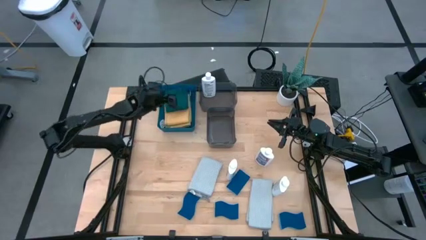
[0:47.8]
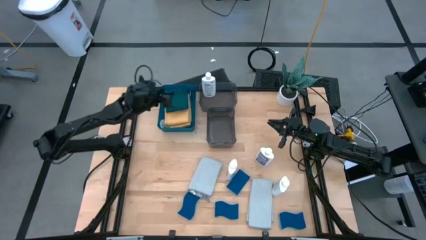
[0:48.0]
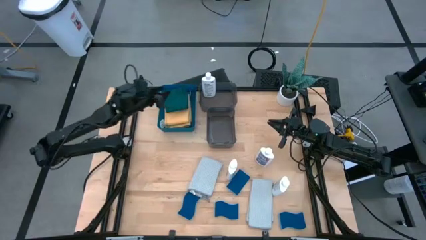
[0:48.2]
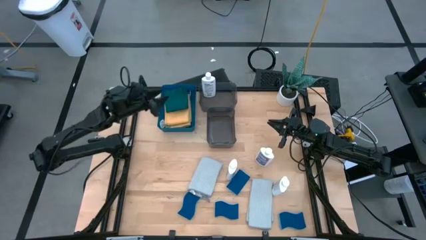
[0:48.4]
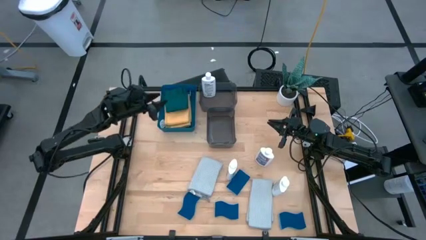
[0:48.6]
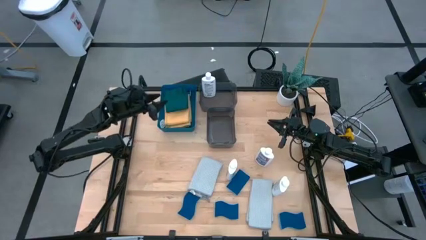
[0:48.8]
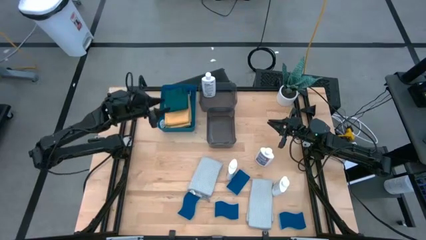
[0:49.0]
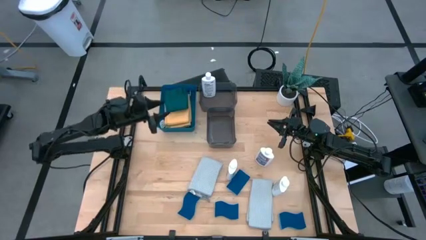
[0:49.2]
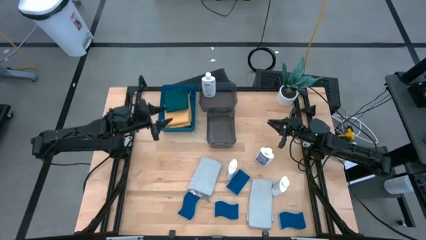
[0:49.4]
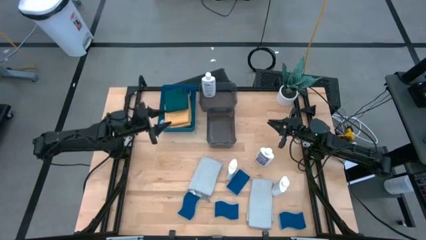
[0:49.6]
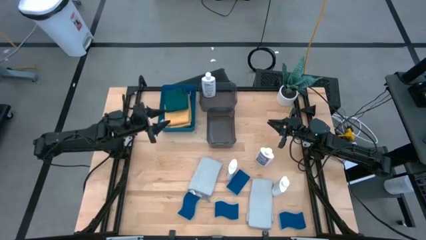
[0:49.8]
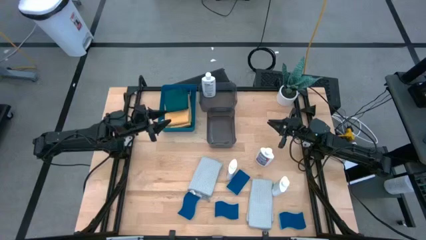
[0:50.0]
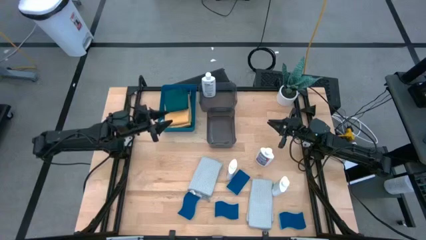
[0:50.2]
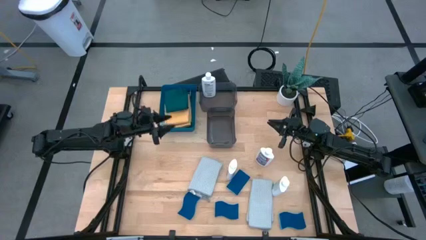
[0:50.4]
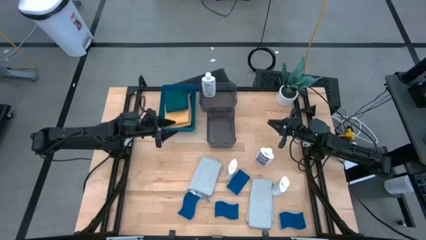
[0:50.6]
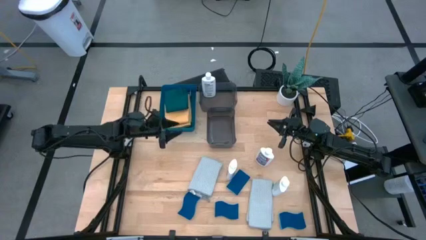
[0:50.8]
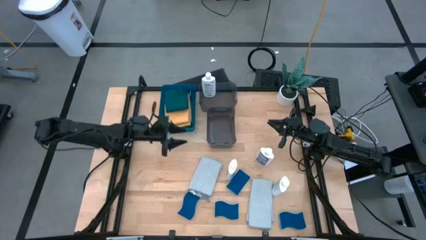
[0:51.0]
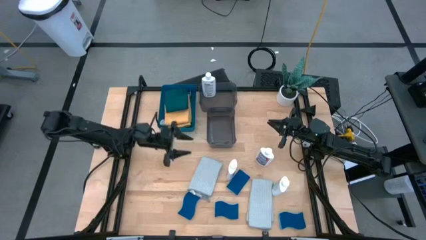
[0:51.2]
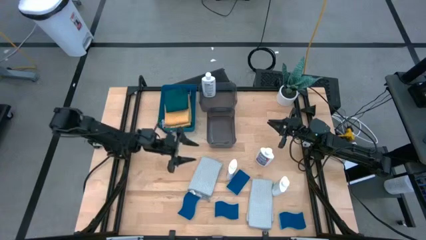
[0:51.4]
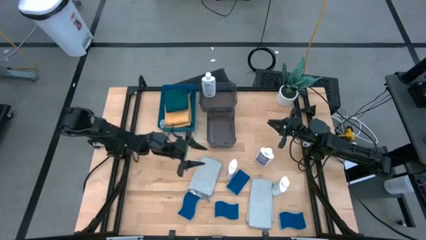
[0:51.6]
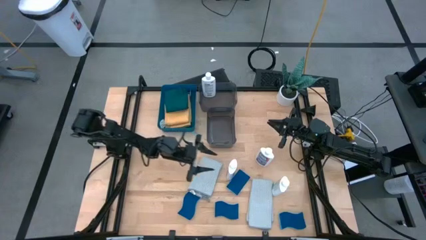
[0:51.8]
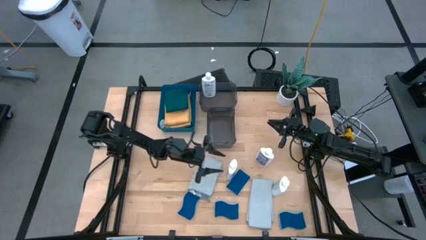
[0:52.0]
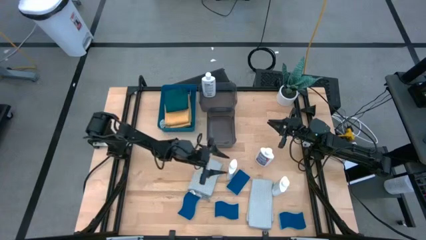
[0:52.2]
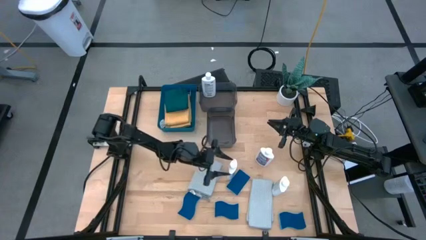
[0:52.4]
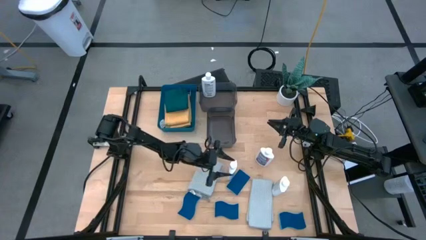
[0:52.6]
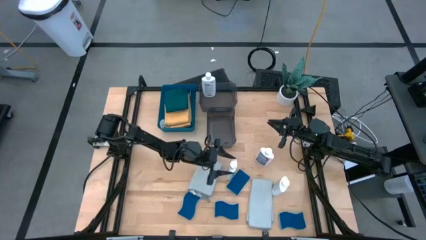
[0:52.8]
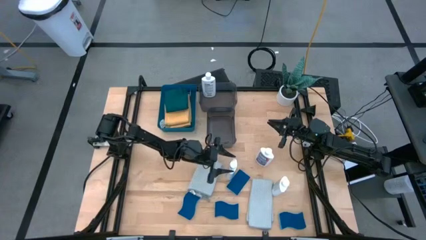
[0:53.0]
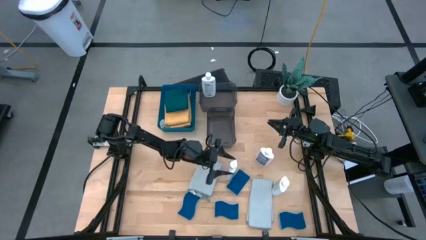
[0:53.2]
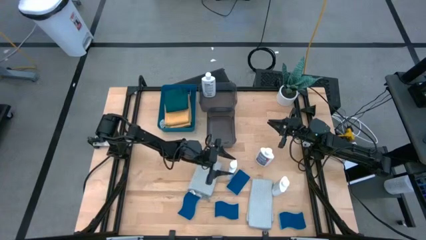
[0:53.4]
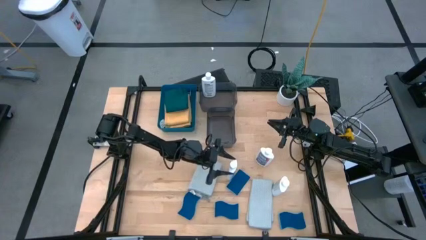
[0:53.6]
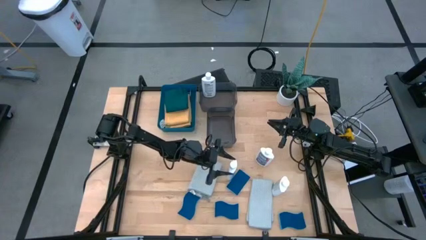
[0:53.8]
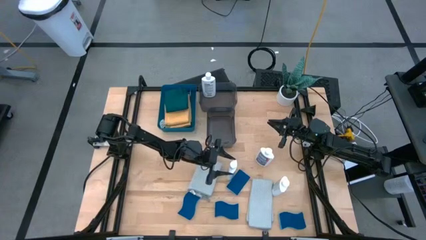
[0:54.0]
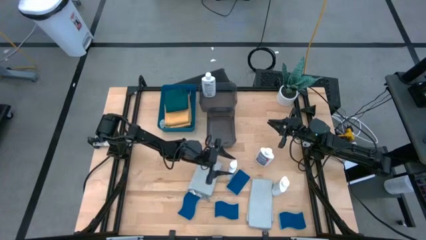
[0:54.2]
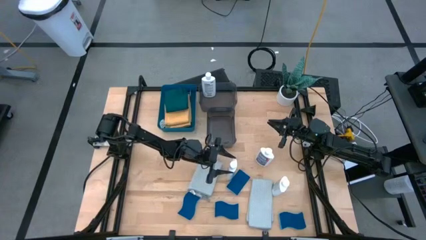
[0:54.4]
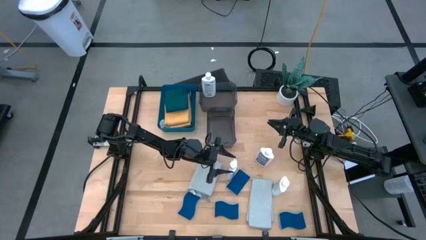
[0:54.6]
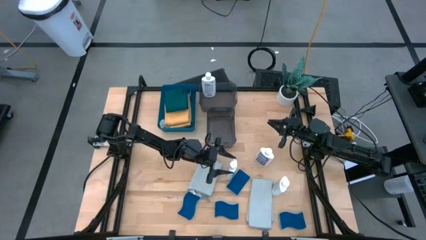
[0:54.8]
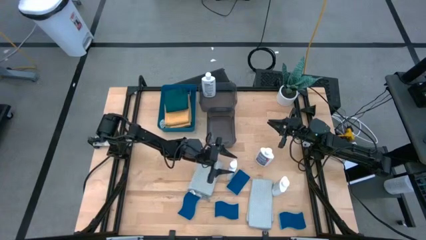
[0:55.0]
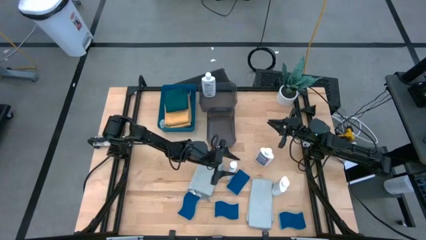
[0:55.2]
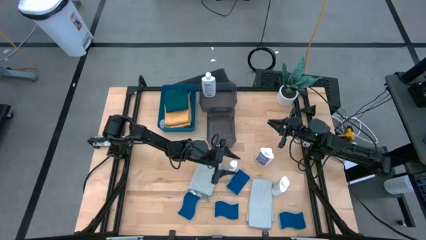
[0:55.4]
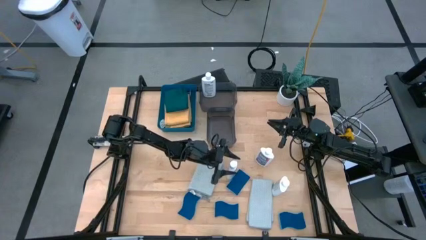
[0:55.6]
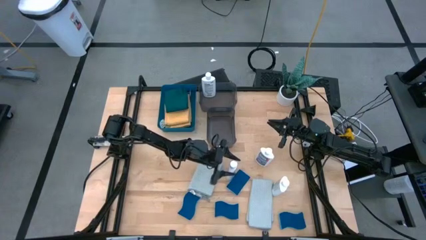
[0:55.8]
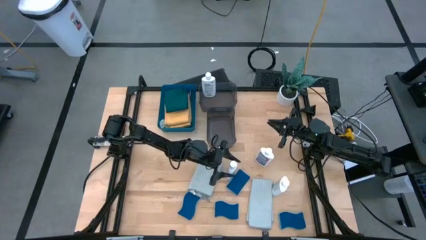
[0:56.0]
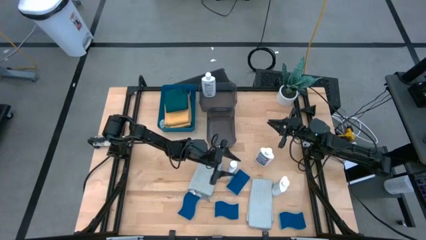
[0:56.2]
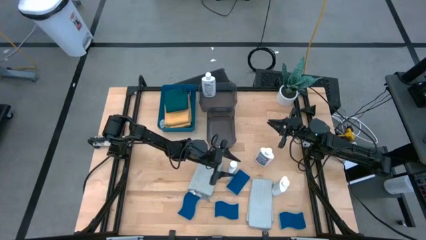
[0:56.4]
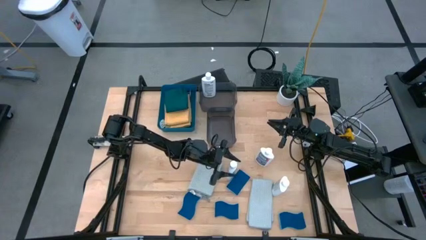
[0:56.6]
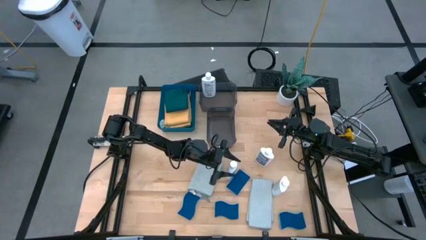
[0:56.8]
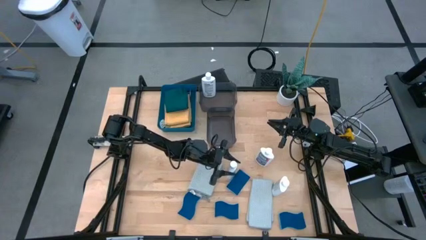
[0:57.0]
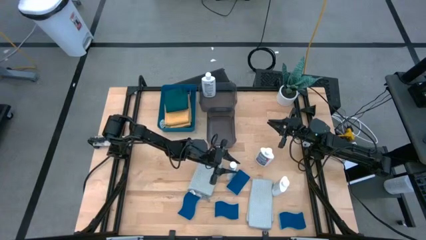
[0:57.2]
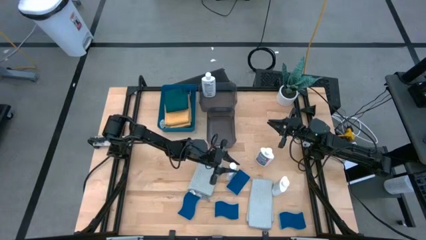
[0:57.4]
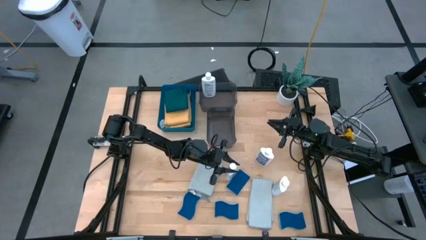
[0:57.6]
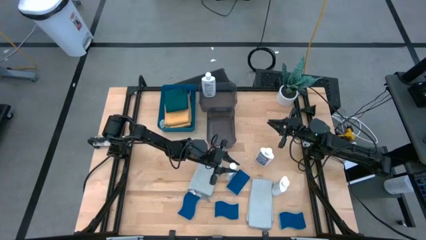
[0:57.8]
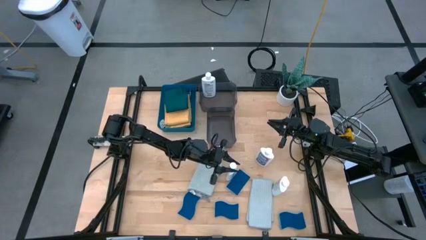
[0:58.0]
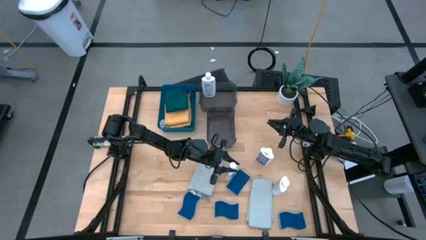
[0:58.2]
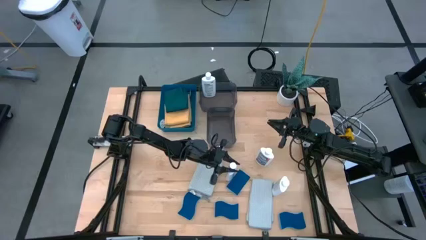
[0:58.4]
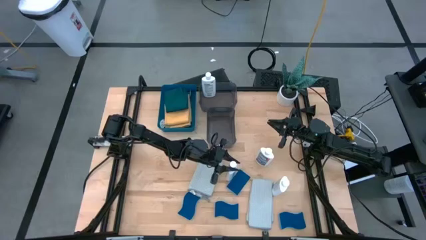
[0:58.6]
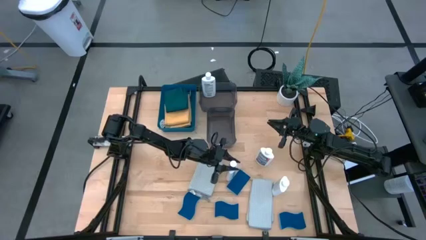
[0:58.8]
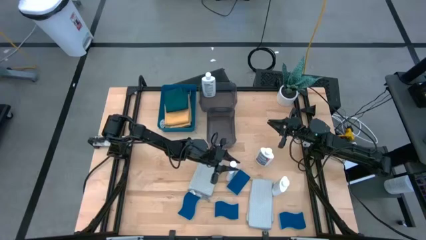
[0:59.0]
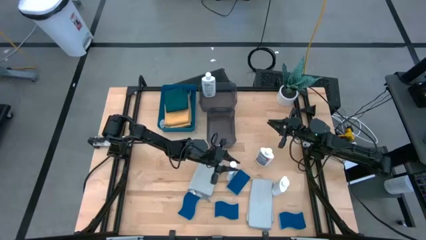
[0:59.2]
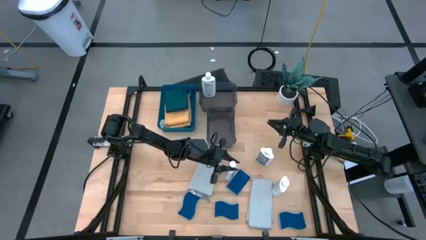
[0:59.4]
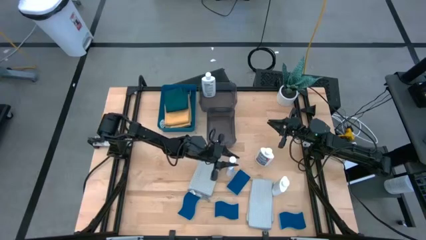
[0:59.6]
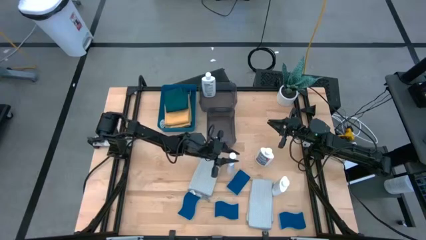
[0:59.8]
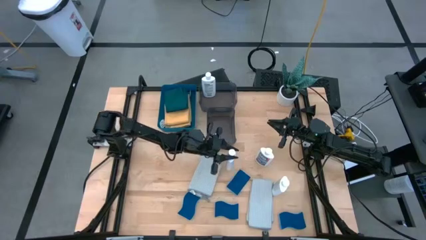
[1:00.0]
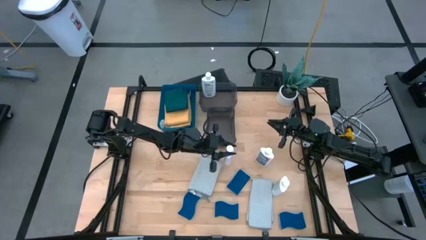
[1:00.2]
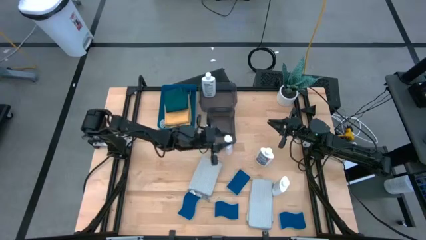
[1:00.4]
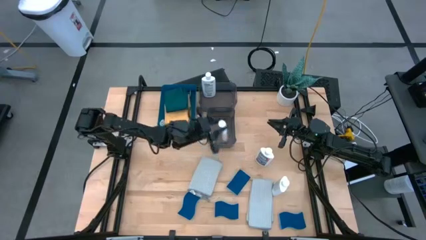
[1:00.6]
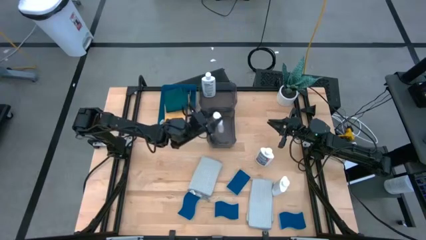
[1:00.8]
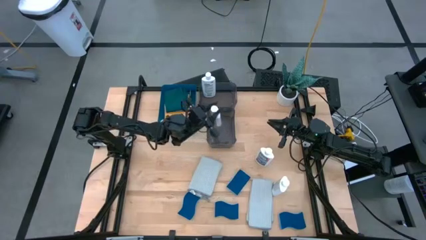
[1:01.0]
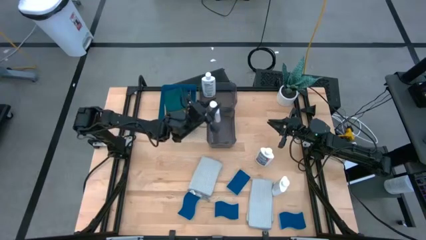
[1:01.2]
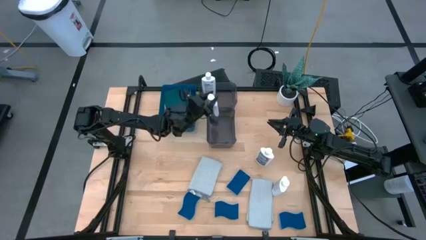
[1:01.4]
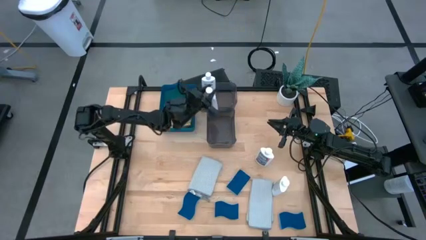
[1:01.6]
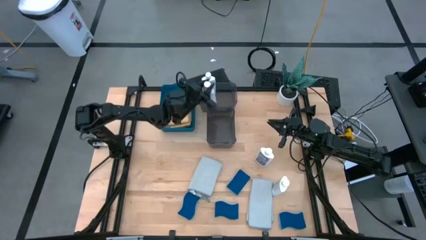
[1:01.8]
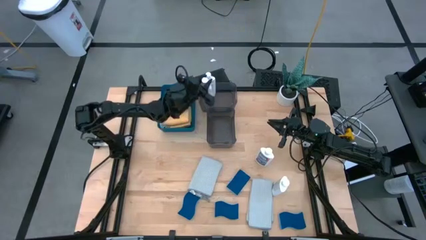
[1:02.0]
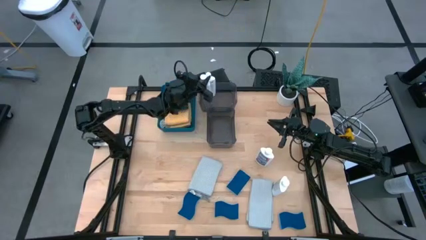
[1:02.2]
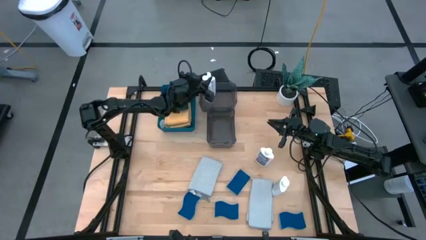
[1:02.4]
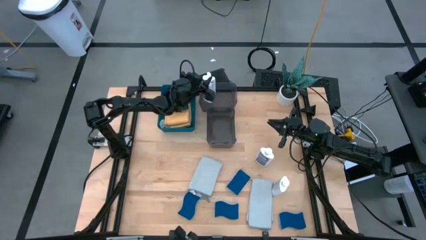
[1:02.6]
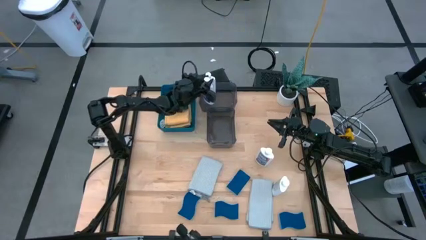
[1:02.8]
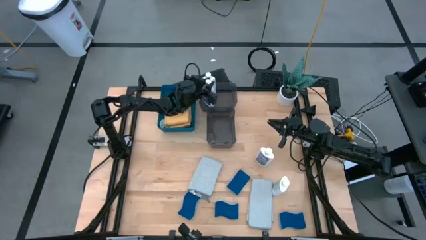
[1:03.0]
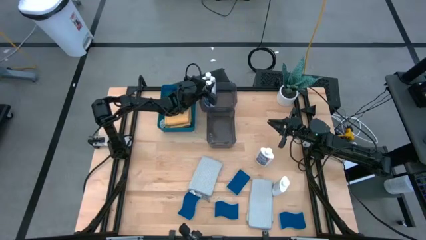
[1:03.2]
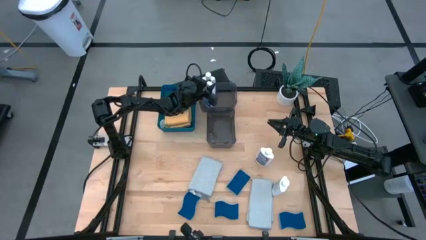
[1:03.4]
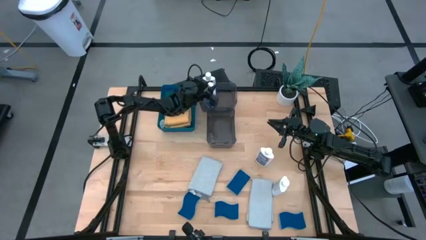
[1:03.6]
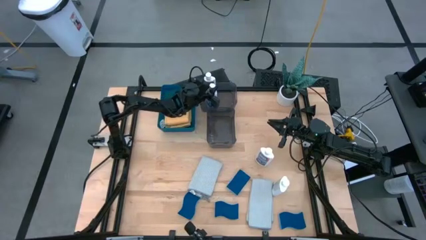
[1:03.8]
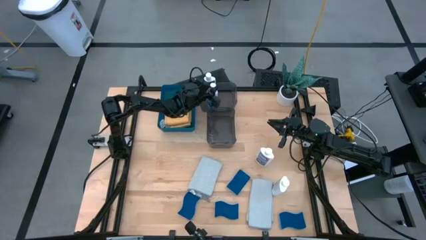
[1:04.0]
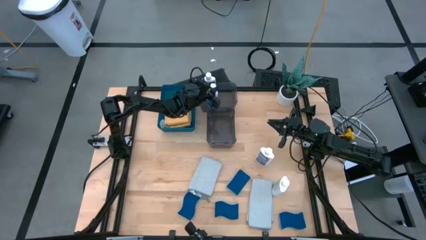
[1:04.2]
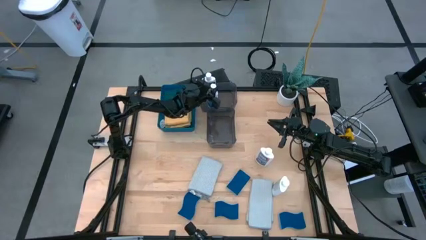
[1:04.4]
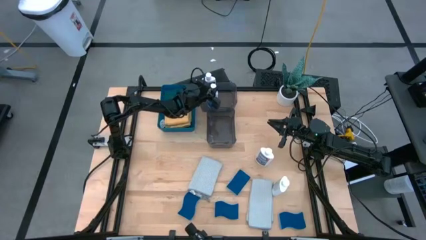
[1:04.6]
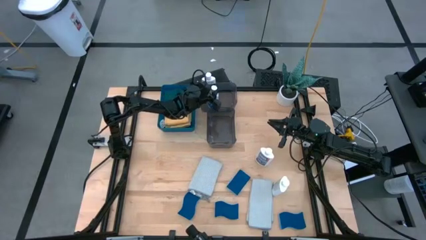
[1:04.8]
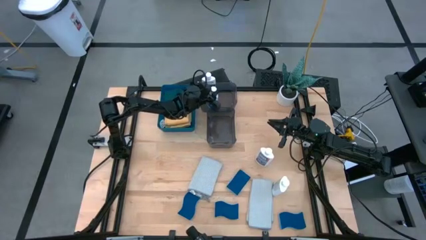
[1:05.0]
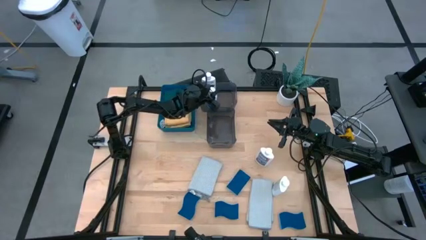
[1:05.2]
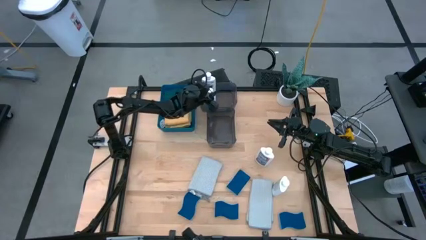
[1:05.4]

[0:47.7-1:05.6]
Task: Pick & Place Kitchen Items
Put the white plastic restorer bottle into the top black bin
